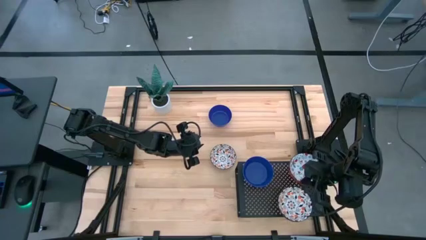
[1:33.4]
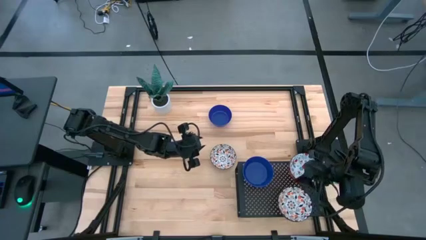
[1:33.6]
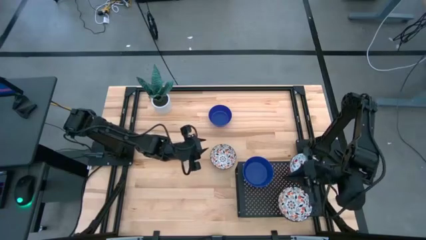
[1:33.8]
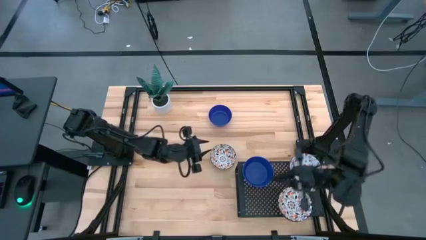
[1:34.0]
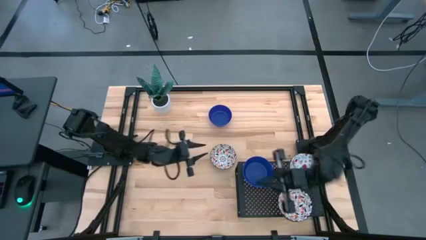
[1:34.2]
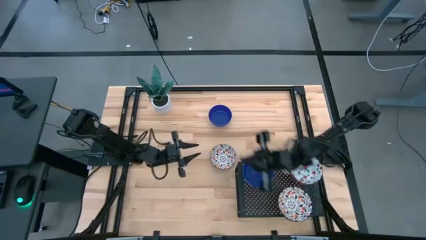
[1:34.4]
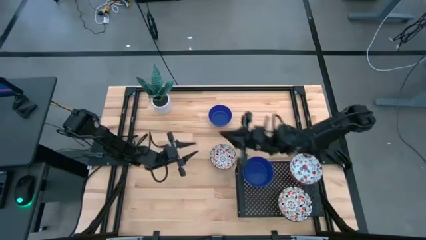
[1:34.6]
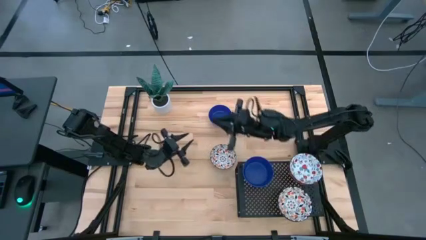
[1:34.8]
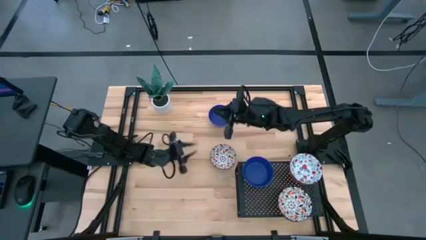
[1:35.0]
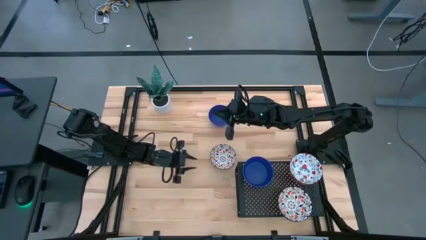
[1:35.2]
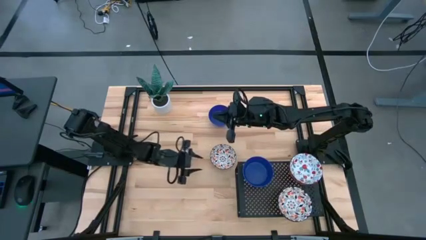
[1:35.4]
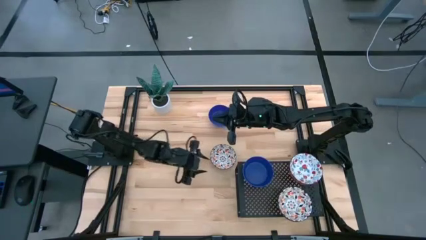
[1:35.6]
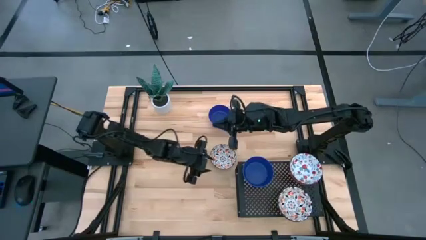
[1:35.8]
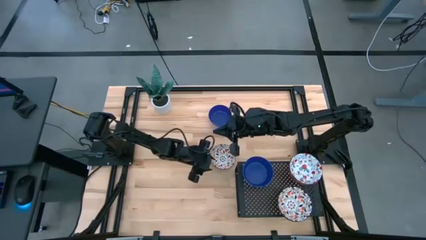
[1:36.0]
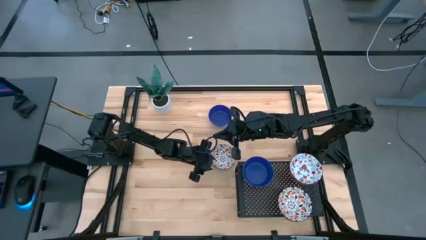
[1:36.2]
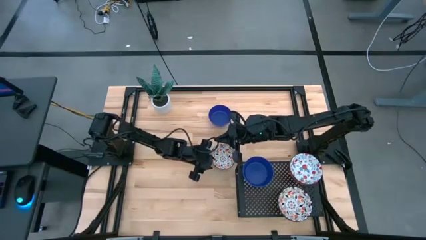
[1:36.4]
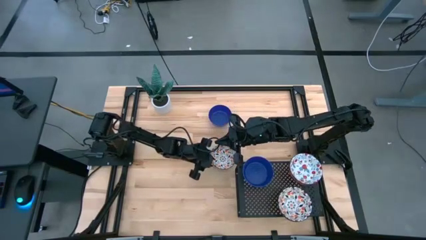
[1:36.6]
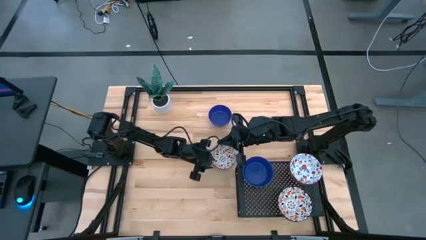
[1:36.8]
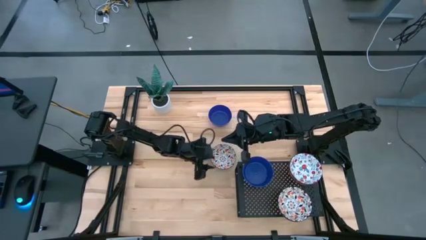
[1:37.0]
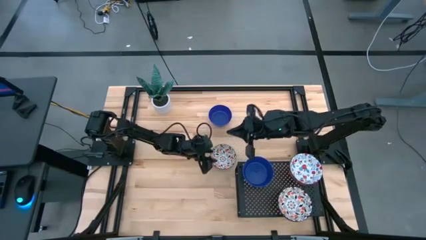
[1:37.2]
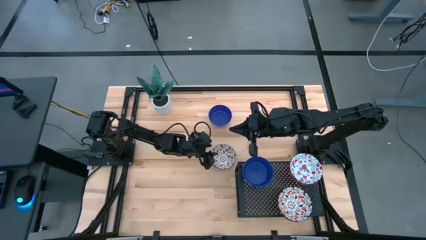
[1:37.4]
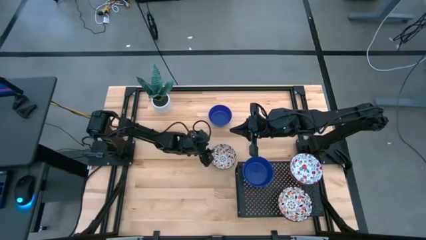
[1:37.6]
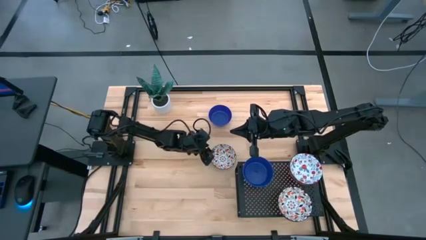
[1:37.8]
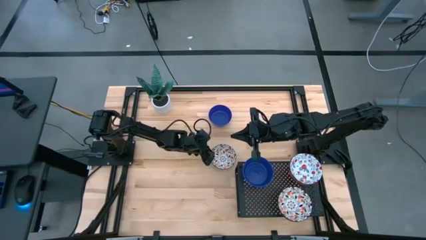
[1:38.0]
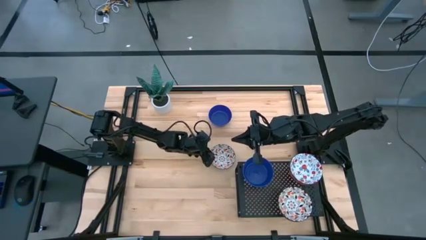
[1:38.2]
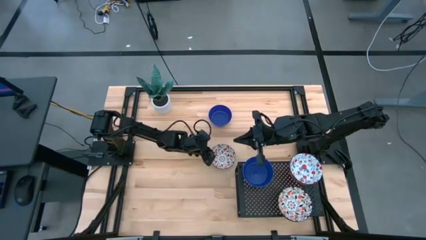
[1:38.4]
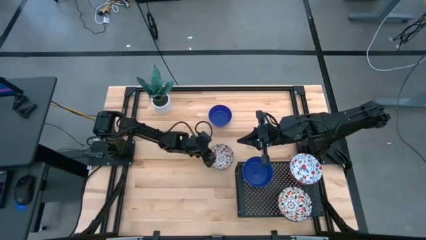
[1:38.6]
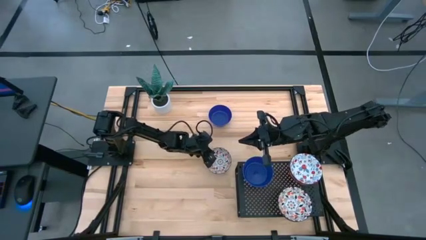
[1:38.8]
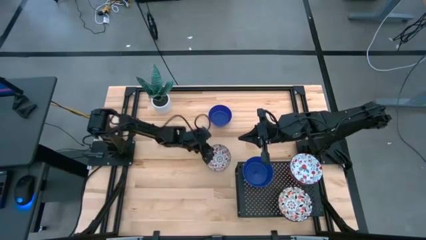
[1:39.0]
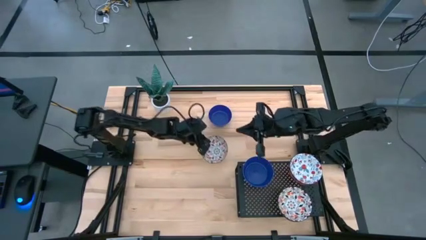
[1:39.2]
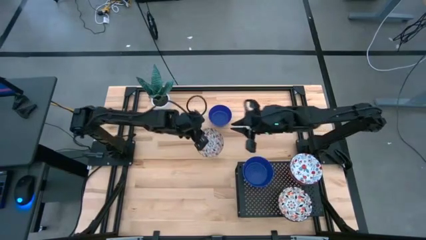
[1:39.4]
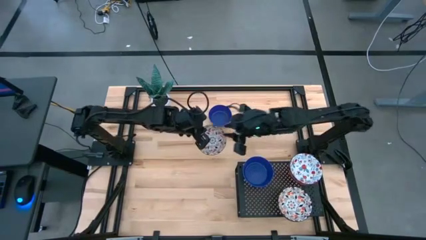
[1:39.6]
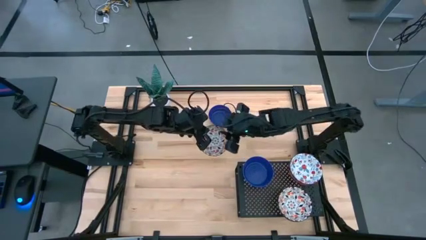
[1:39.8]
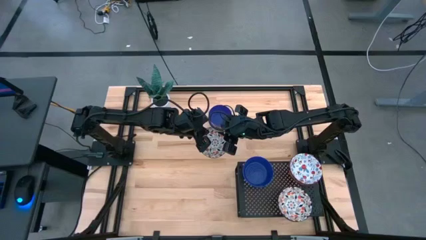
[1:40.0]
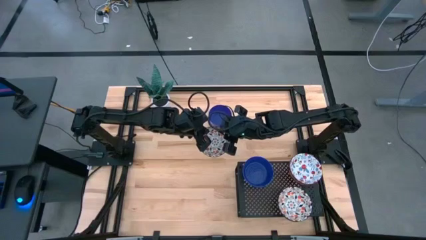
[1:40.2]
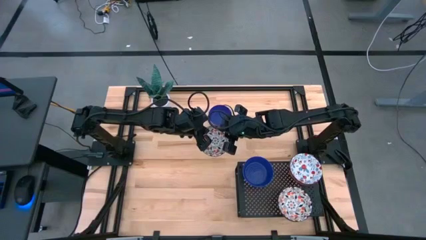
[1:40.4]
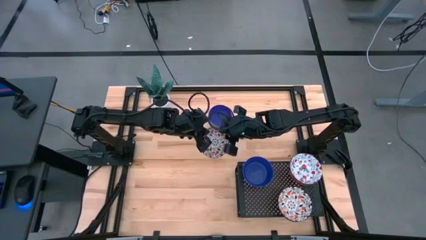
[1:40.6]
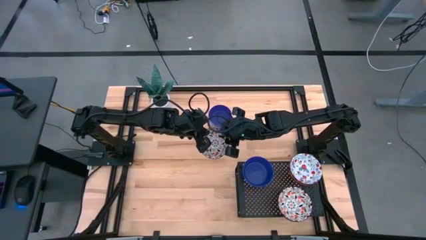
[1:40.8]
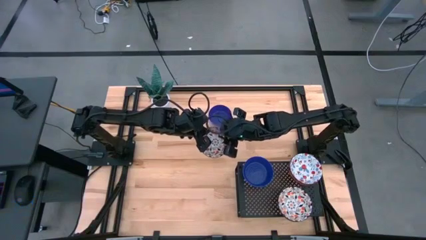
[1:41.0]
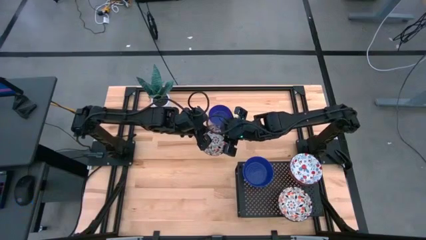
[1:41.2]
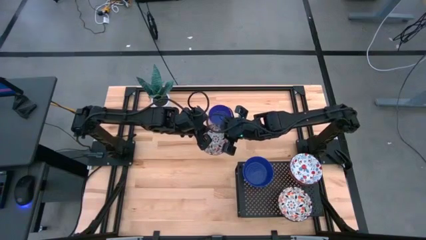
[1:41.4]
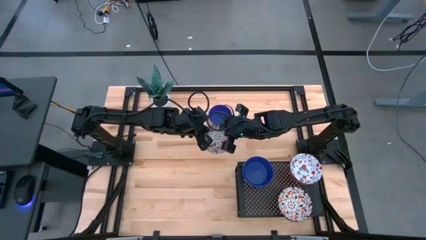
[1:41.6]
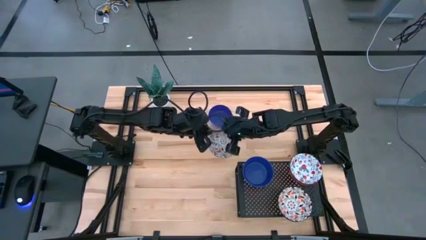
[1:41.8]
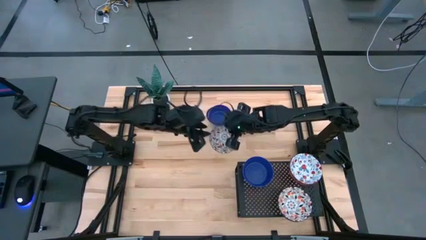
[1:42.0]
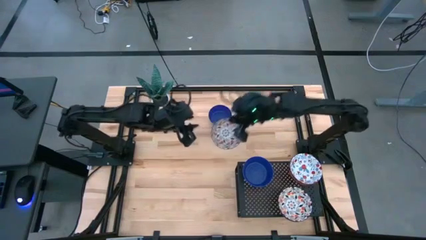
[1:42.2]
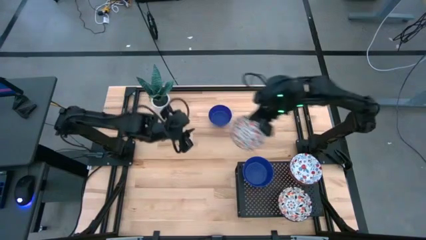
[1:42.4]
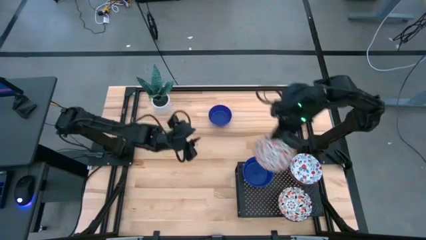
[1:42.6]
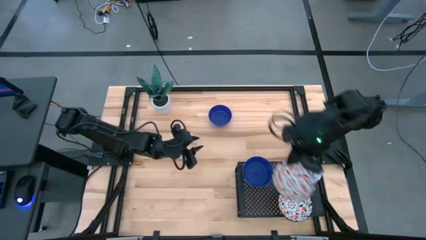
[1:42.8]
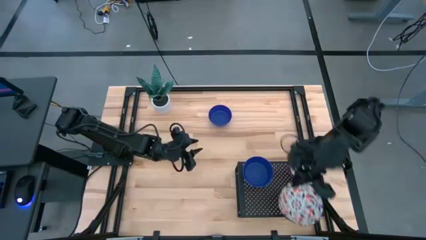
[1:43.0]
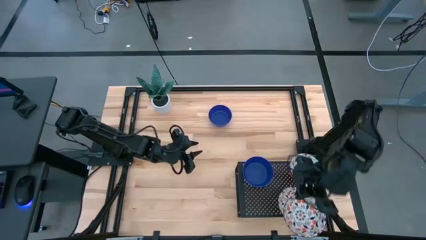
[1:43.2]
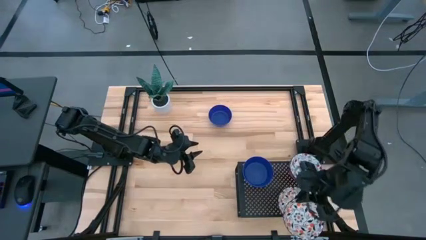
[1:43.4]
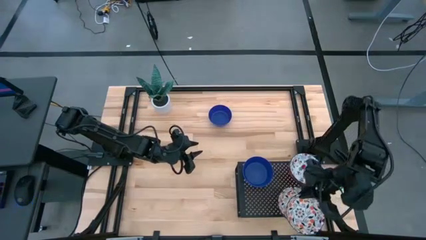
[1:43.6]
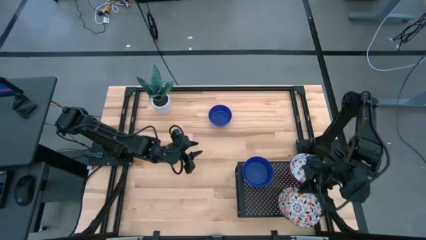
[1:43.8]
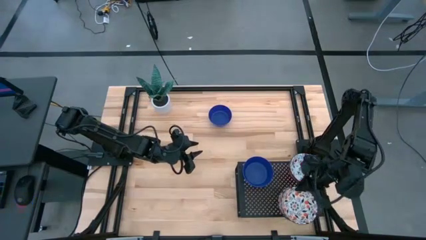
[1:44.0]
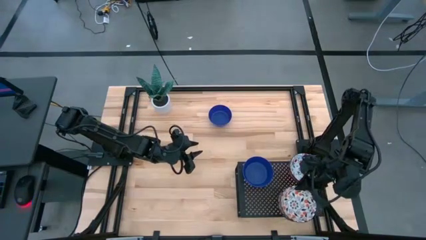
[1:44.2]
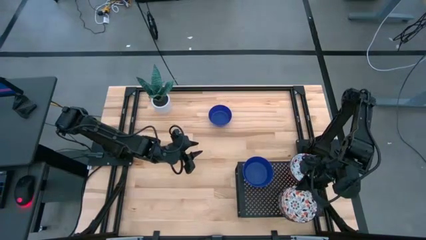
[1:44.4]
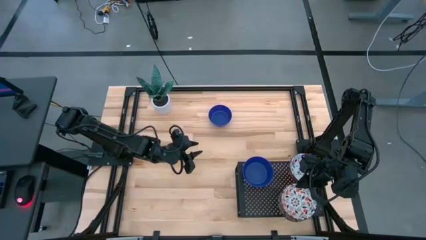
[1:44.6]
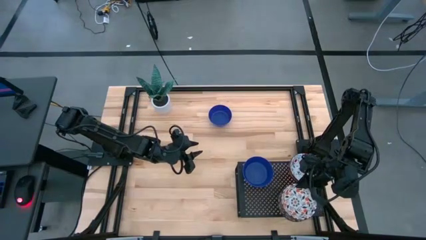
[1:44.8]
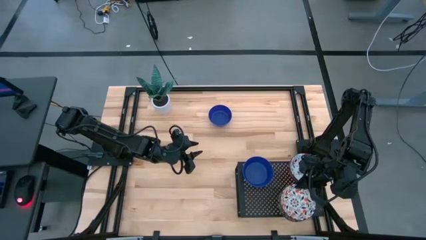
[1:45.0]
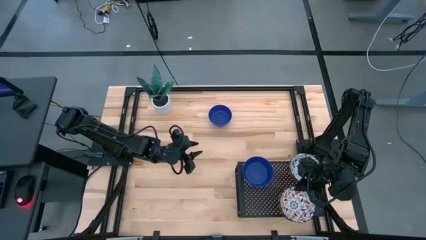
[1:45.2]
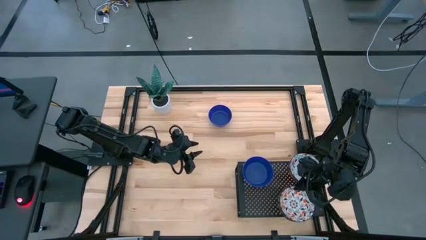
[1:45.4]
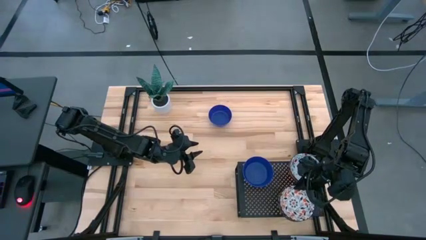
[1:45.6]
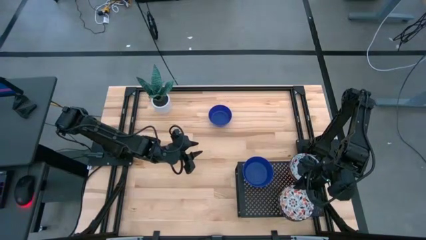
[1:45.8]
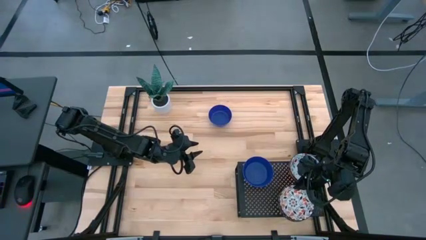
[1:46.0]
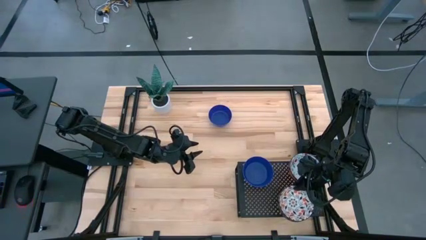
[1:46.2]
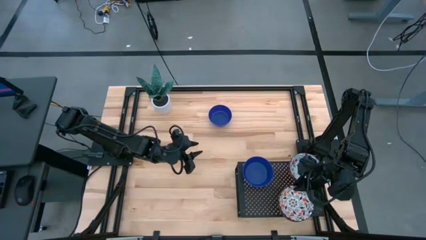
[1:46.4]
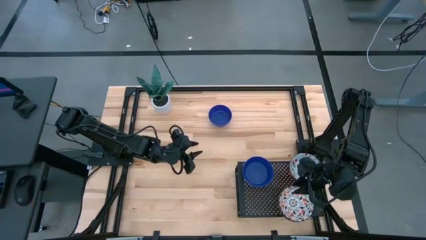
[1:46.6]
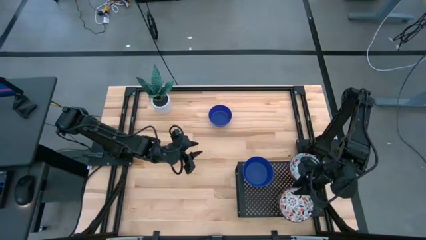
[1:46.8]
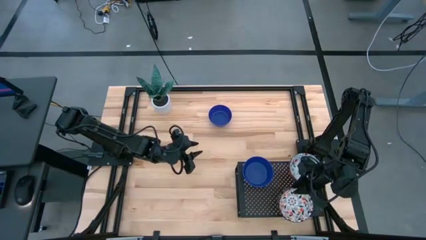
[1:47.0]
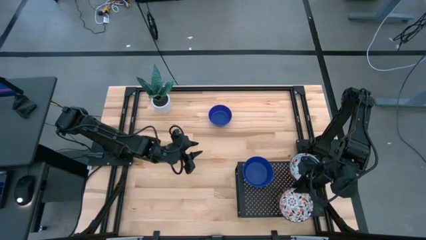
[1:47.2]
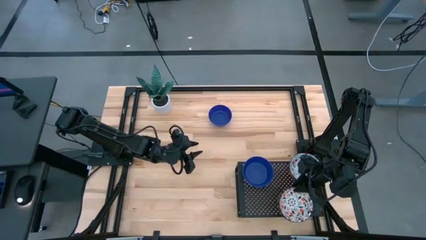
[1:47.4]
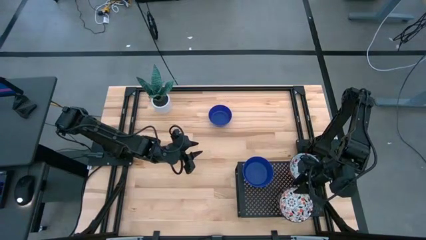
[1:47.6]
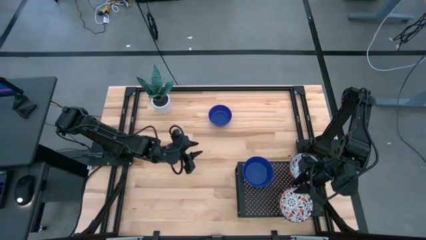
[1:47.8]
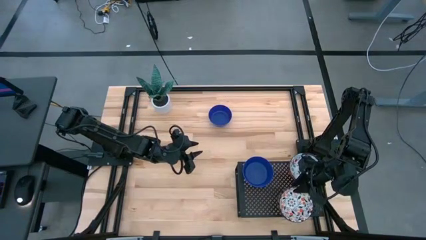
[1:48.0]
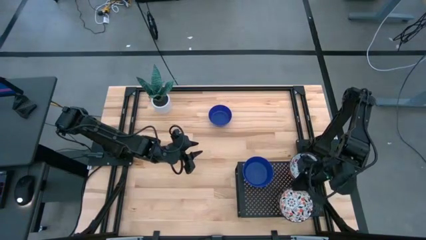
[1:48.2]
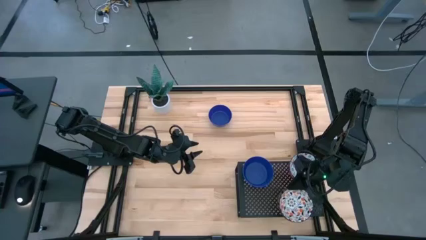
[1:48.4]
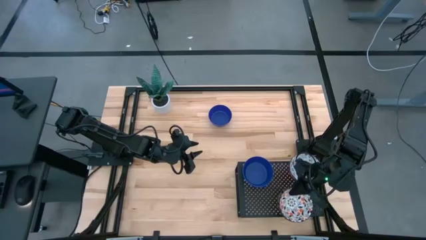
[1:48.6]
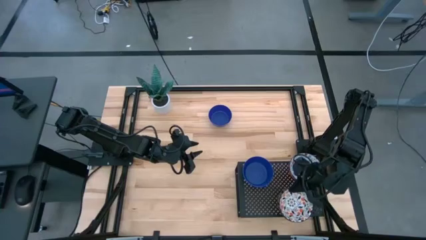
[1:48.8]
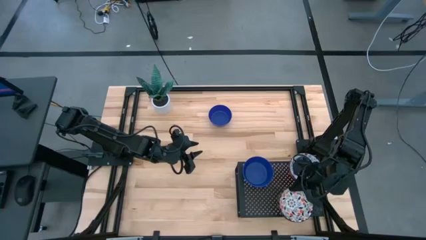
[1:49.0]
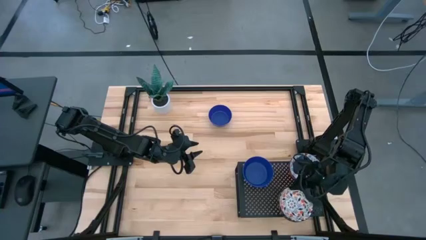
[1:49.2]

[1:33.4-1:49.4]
Task: Pick & Place Mini bowls
Stack the orange patterned bowl on the orange patterned bowl on the shelf
